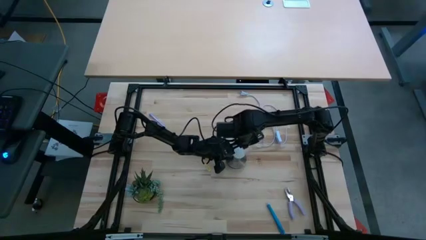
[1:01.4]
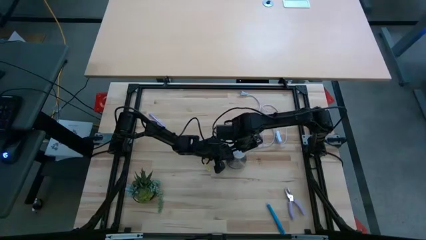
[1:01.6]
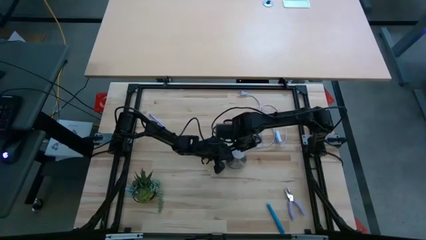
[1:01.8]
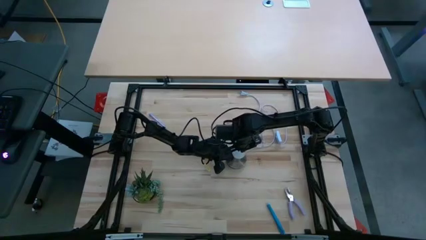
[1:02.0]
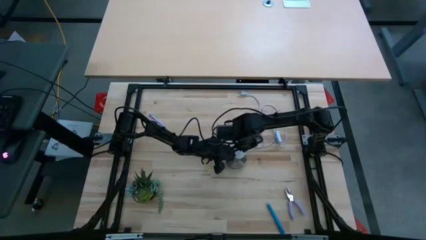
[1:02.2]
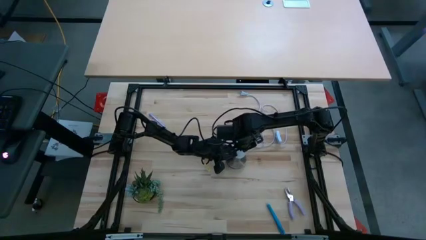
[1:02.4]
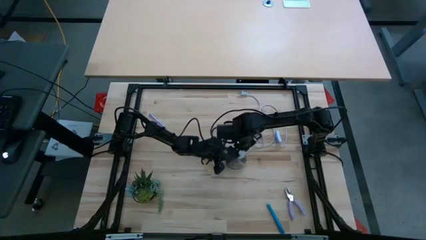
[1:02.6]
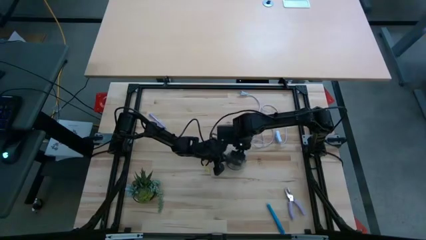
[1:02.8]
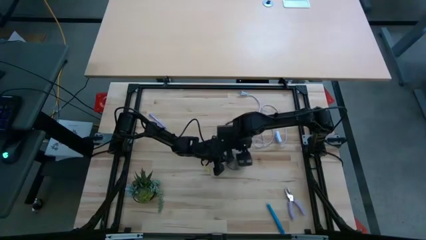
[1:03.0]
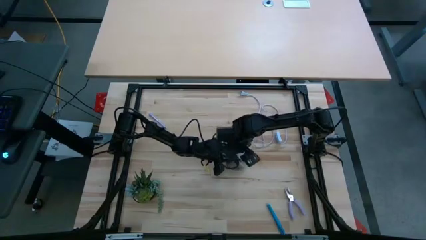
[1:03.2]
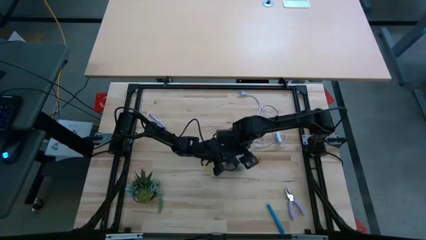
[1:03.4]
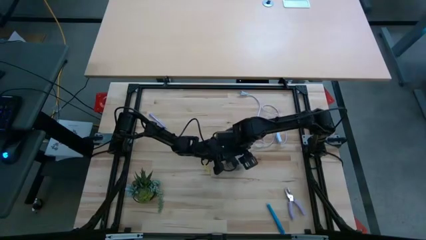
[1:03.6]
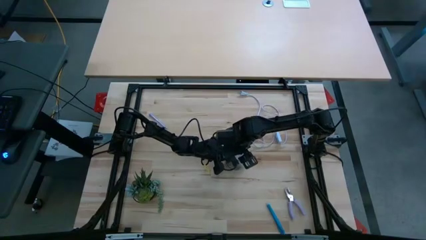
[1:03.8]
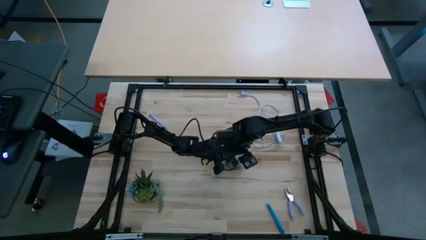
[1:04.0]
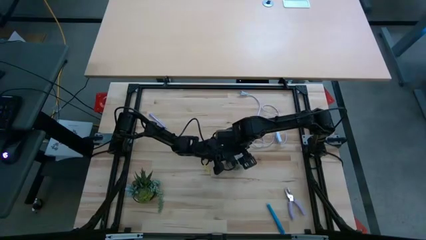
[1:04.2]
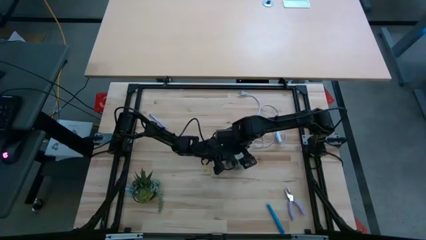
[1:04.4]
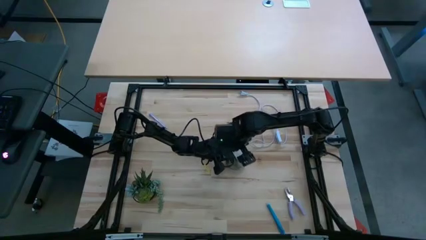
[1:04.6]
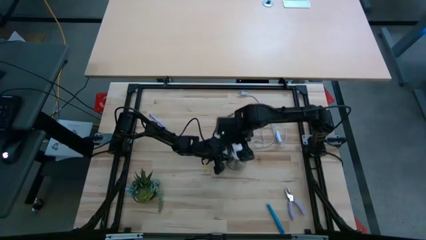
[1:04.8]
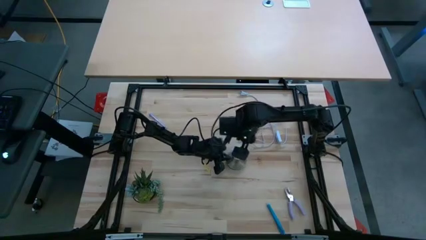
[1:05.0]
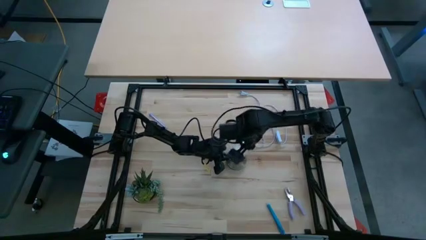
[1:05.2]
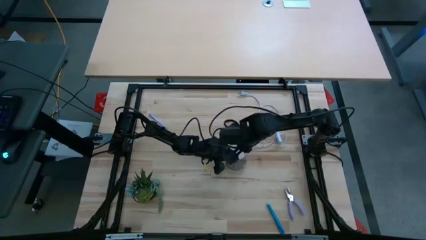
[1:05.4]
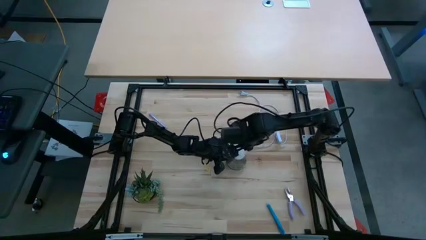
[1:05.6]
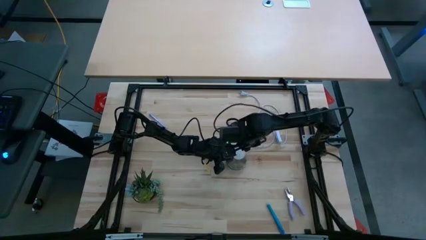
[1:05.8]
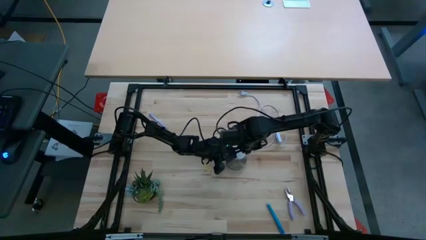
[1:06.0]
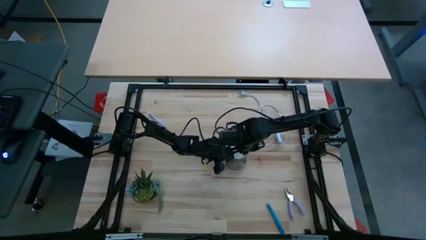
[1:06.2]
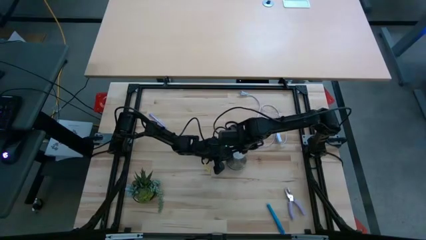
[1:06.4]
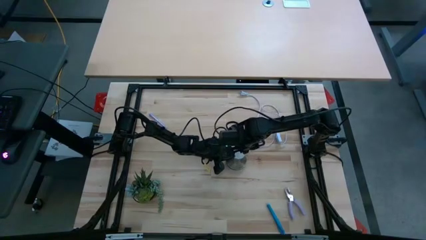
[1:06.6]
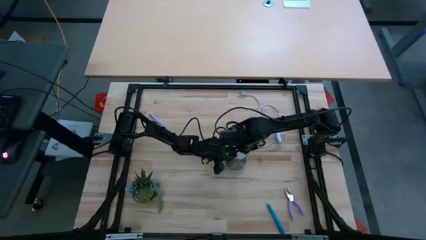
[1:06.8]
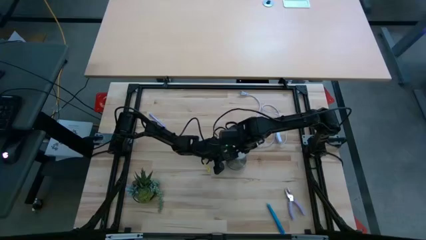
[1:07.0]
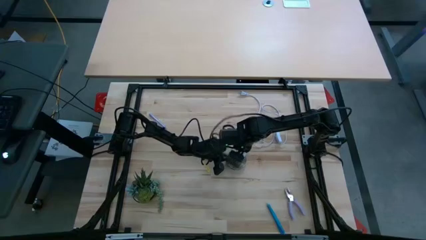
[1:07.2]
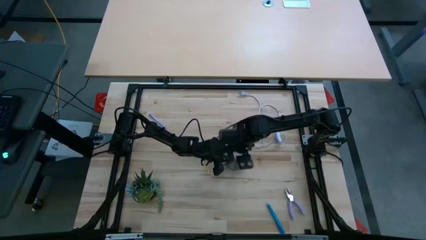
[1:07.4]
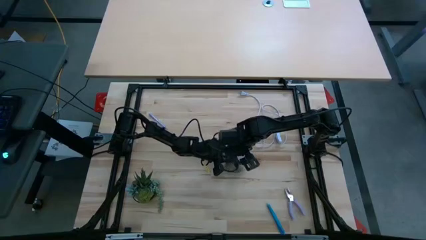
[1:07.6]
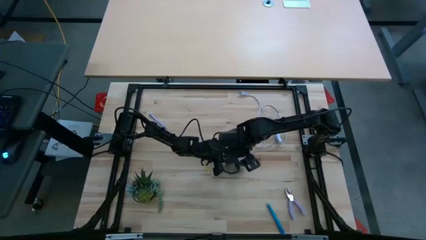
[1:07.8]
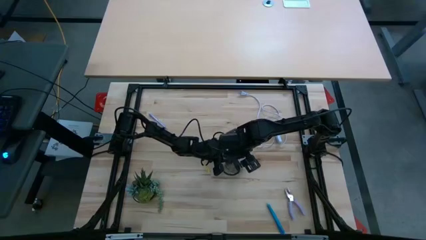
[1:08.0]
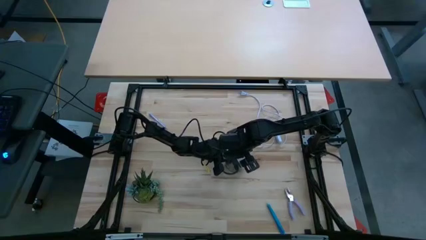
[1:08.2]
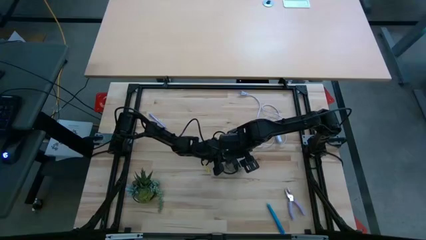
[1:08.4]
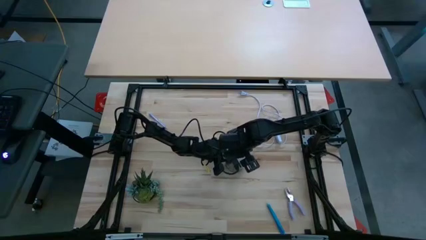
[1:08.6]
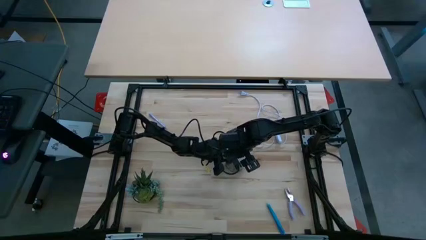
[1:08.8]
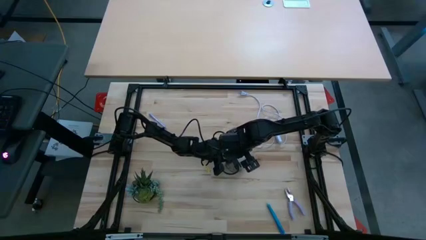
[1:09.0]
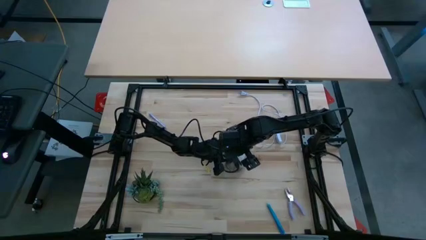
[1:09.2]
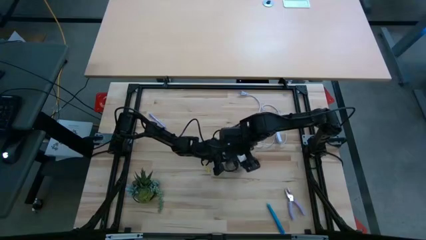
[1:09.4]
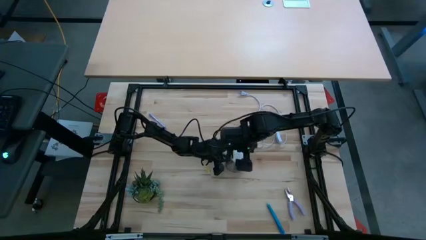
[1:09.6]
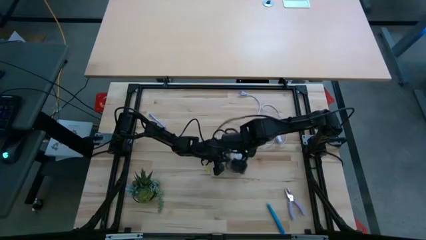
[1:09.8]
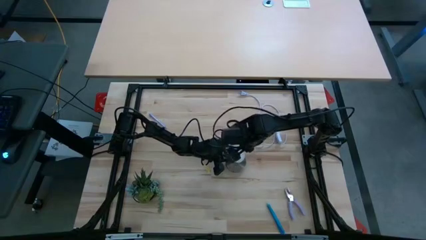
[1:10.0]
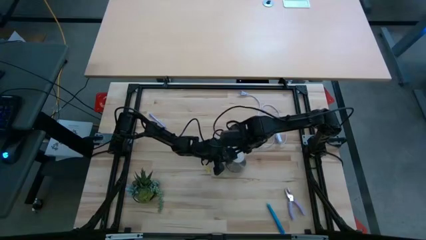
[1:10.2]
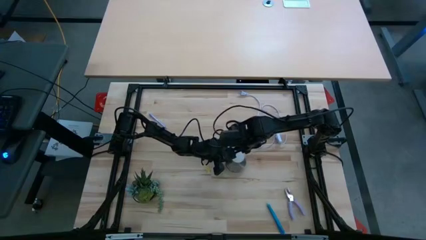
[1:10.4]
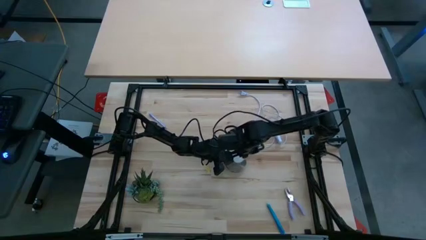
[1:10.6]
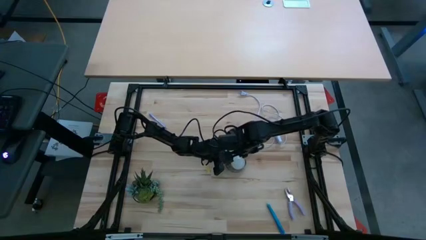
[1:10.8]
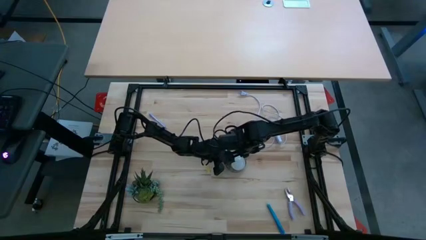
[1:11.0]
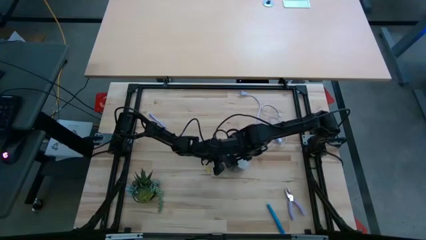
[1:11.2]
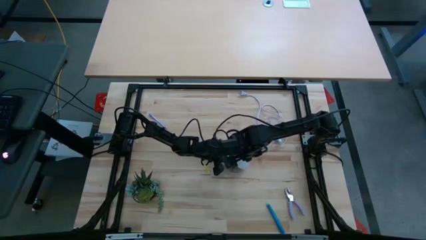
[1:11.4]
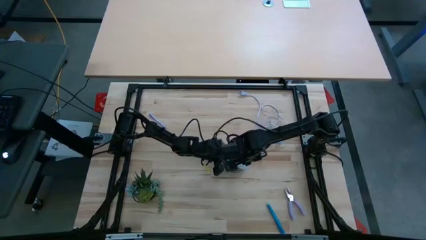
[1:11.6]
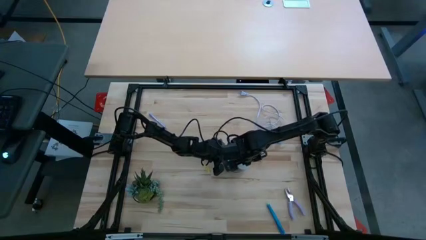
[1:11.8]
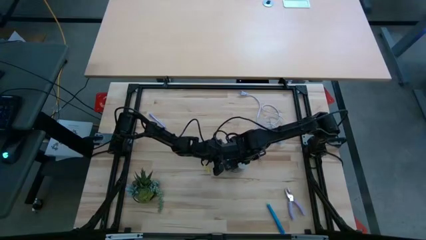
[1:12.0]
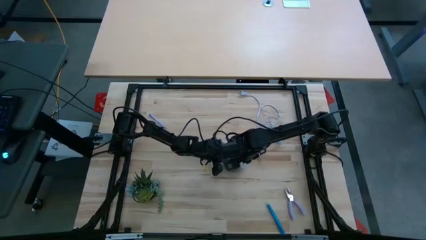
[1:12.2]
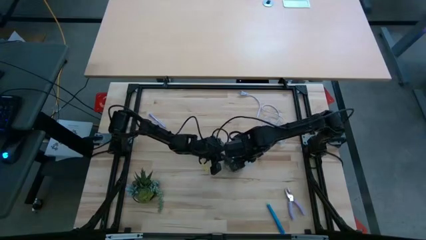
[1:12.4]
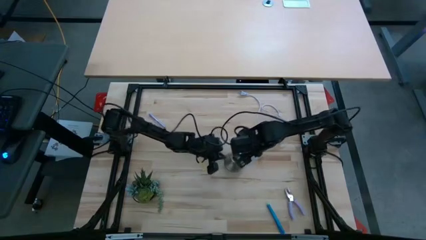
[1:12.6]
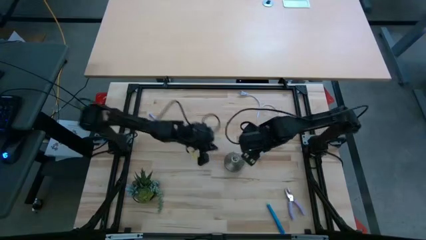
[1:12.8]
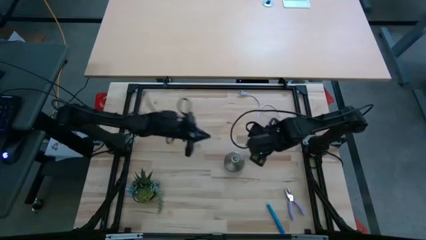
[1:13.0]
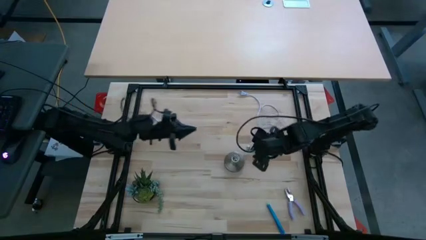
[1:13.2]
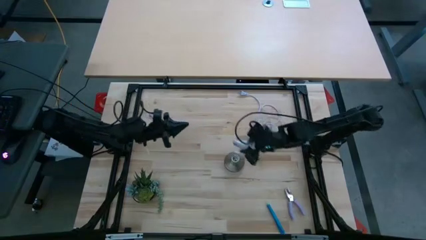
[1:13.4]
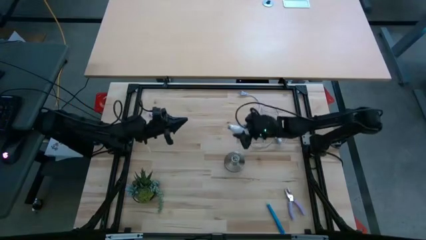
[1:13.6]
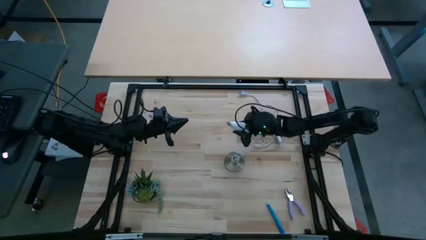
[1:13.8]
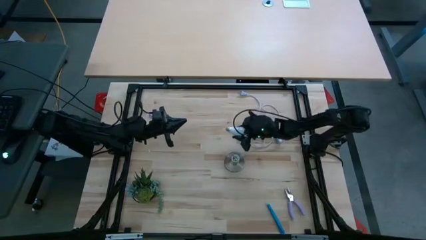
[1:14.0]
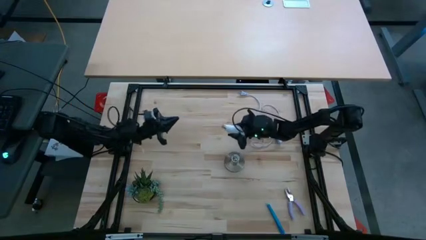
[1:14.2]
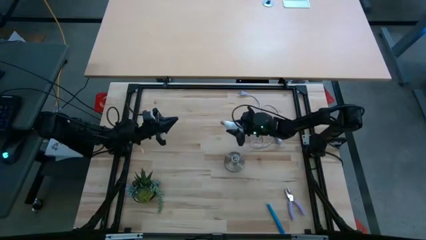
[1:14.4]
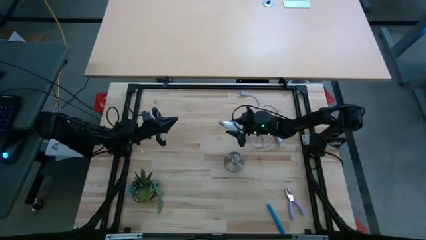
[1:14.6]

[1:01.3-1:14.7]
Task: Screw lightbulb
Remove the lightbulb from the lamp

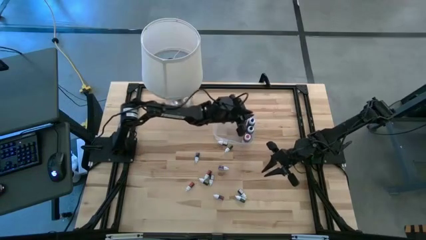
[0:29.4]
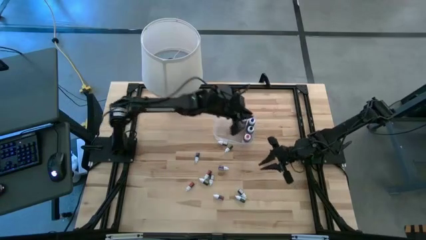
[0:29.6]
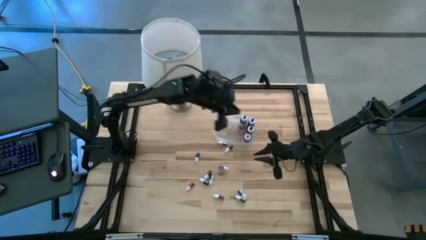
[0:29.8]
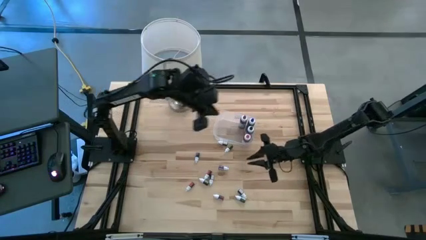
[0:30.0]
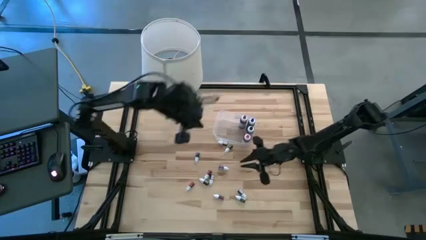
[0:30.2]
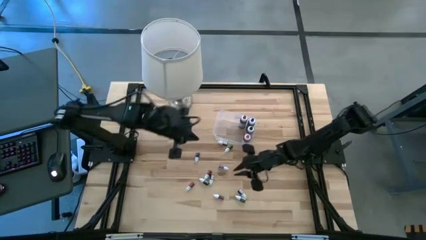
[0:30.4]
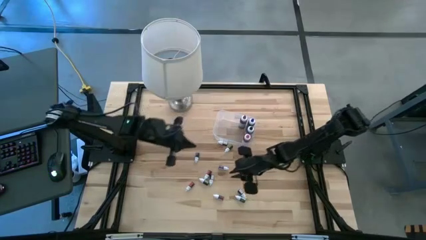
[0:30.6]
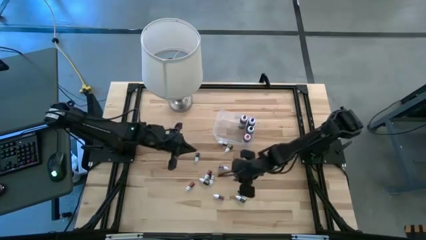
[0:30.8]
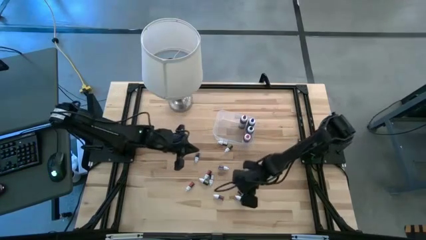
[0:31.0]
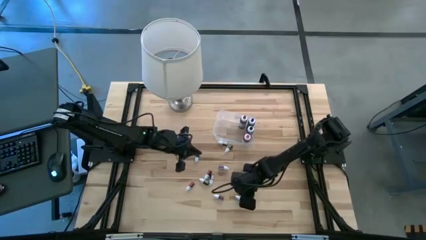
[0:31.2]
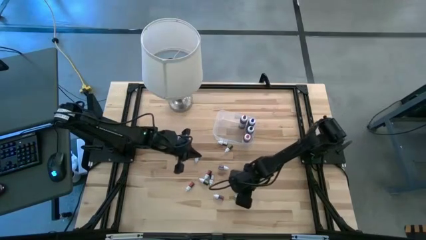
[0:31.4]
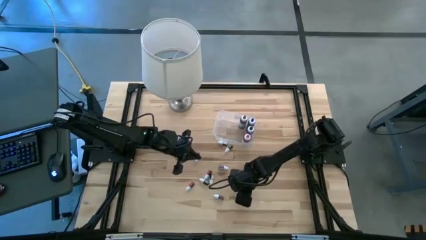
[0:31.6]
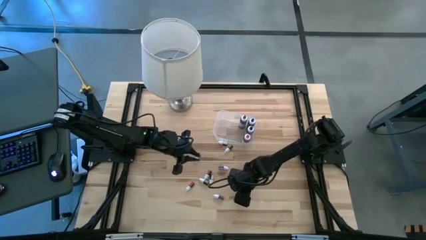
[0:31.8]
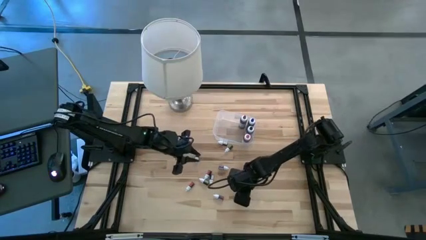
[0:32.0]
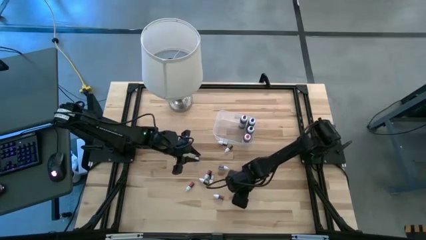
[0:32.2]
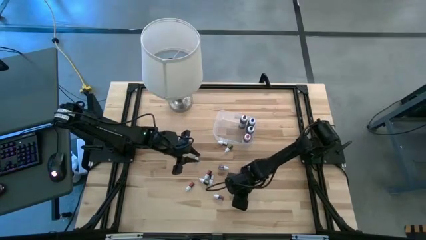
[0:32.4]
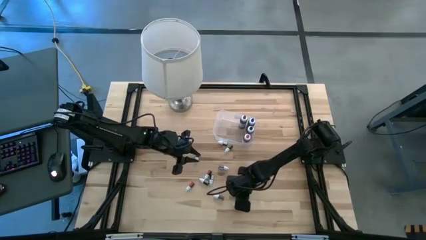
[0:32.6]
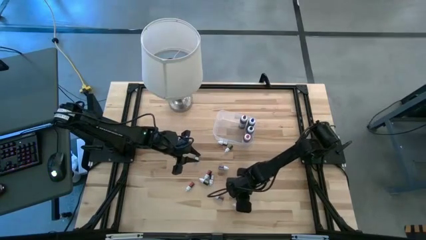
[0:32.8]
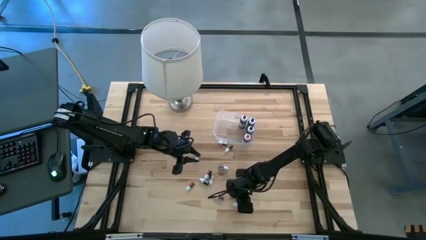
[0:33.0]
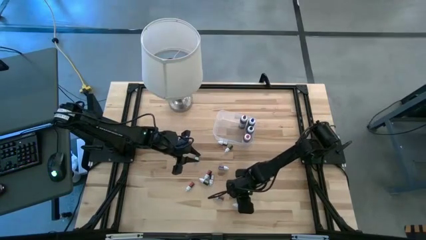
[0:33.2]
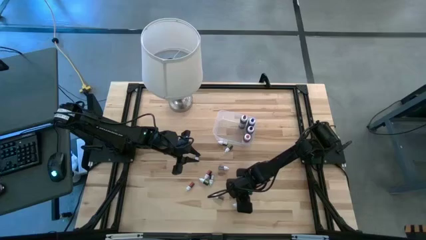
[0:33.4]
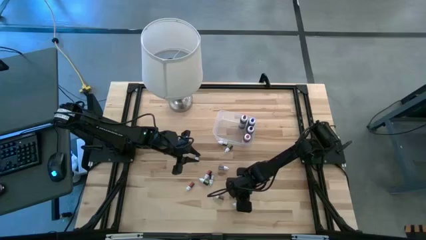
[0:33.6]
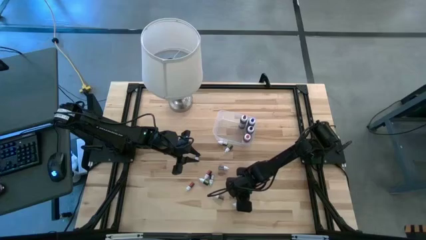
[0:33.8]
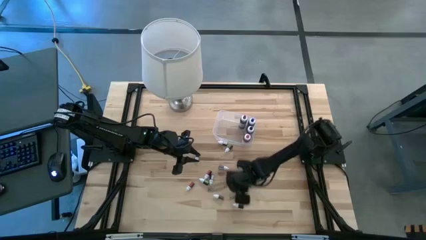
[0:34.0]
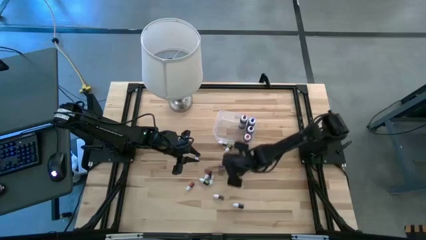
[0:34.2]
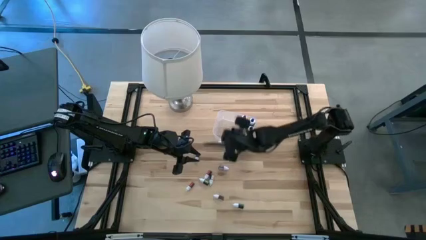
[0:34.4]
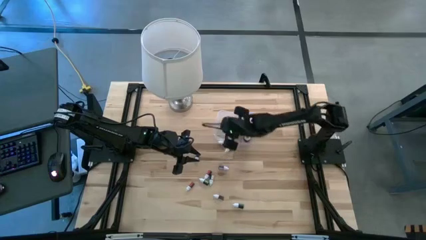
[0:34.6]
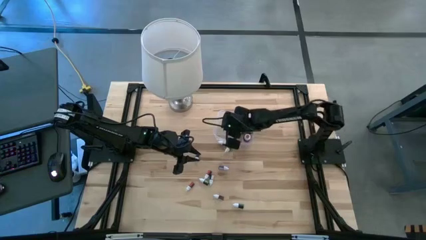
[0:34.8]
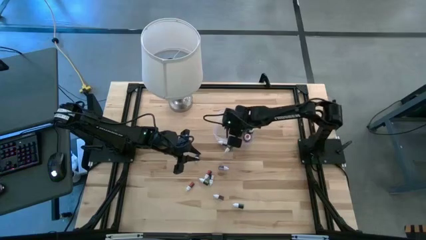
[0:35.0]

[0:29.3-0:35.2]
Task: Pick & Place food coloring
Put the bottom small purple food coloring bottle into the transparent bin
